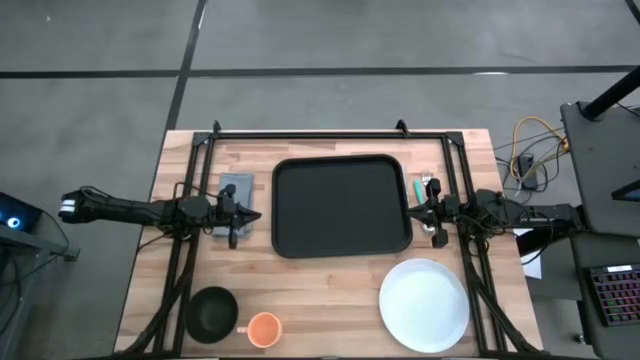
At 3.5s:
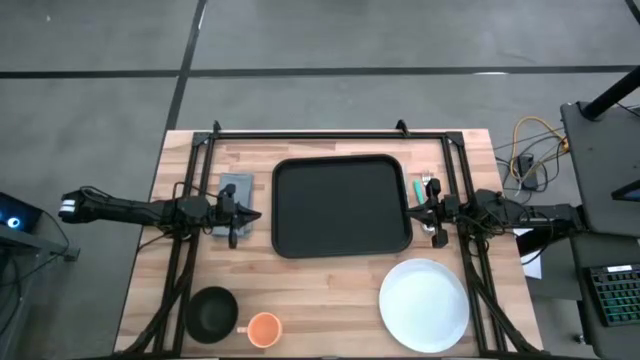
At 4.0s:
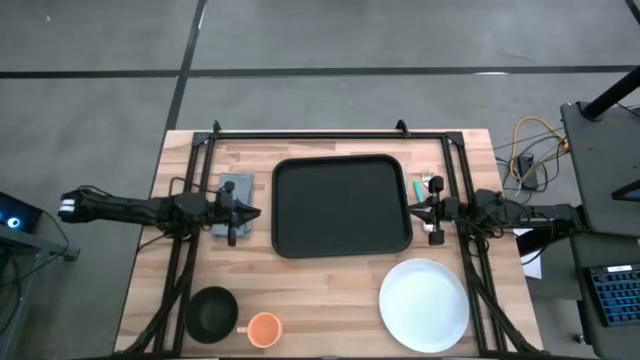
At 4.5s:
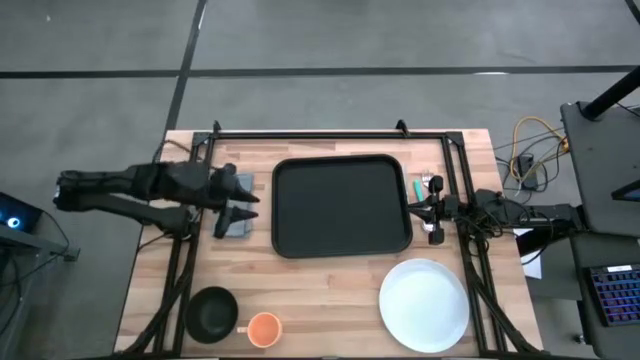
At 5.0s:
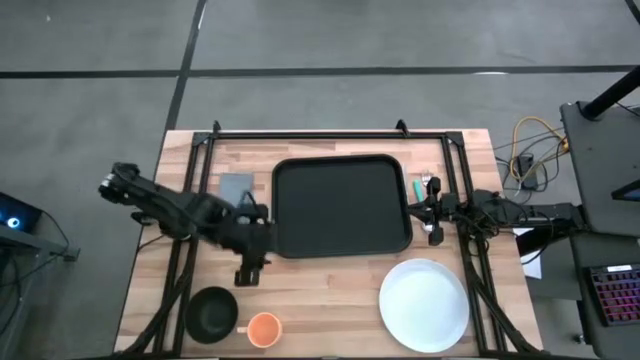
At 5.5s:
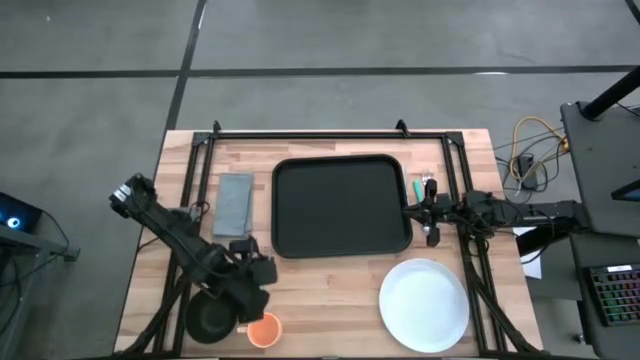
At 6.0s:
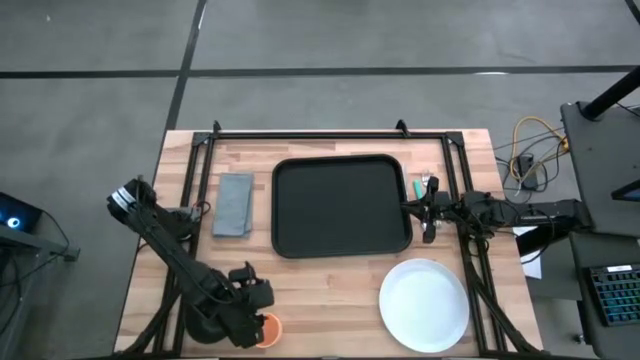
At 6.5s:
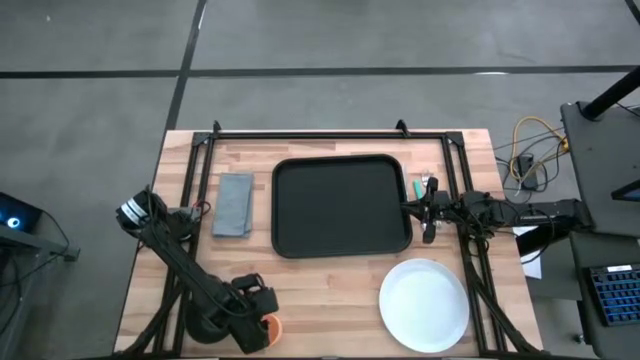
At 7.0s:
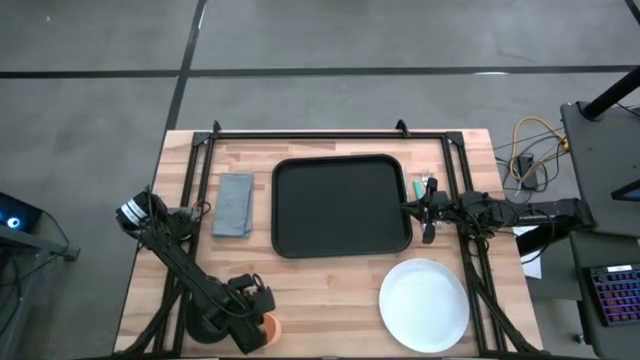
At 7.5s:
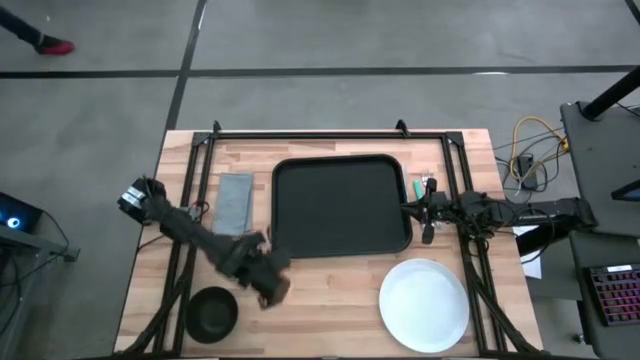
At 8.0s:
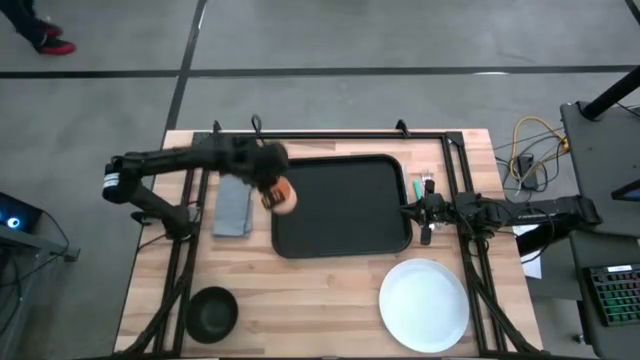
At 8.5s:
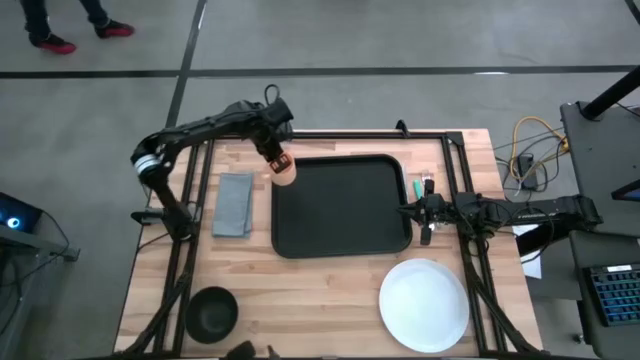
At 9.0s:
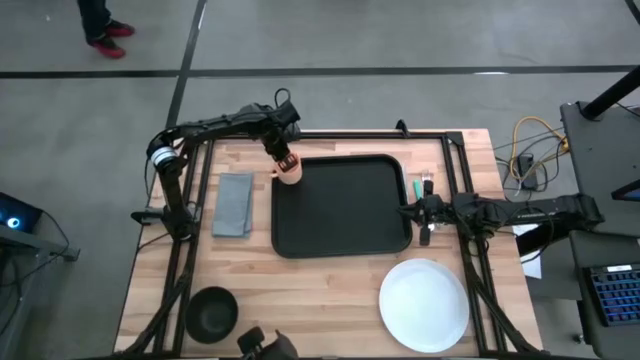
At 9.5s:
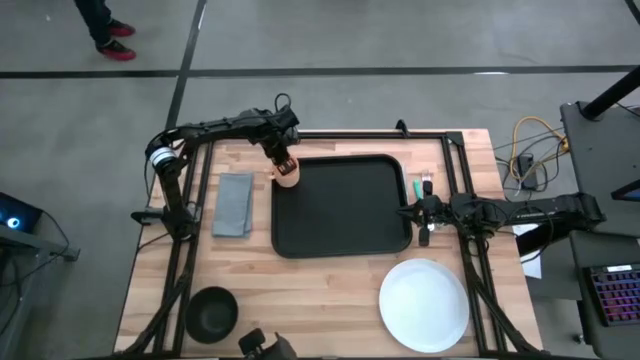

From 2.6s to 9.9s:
Task: Set up tray
Put the orange mug on the top left of the black tray

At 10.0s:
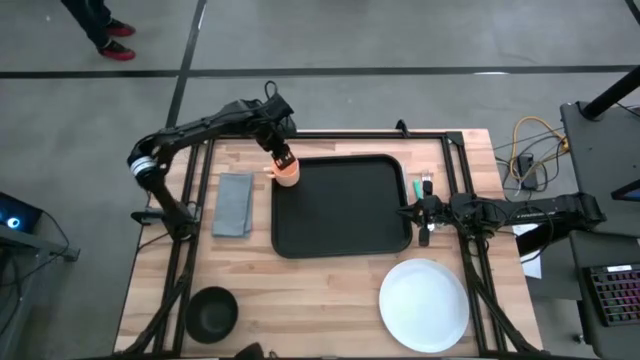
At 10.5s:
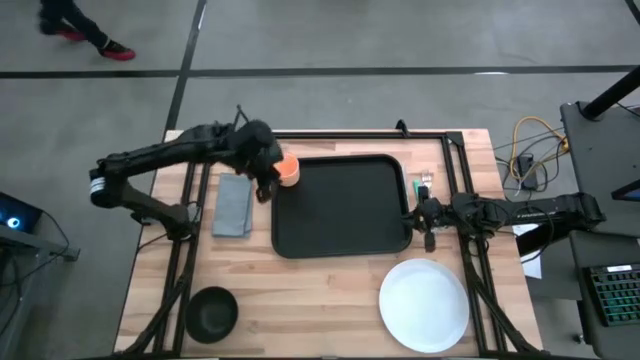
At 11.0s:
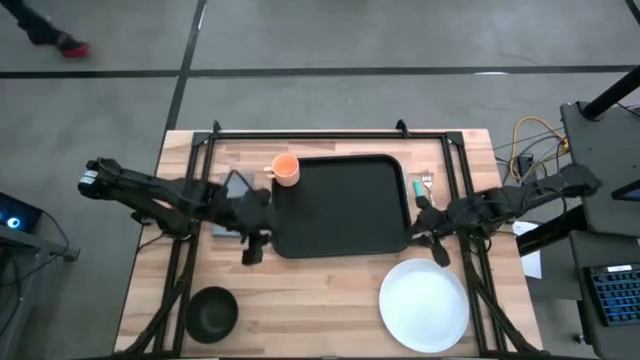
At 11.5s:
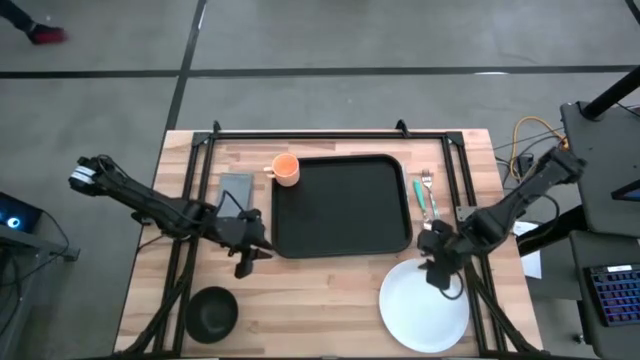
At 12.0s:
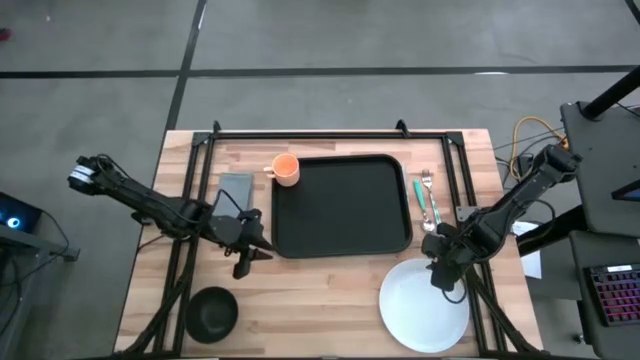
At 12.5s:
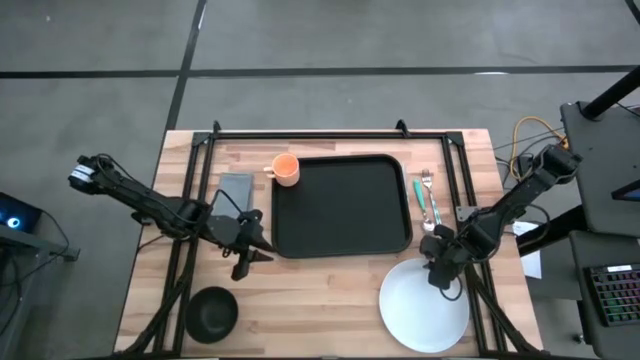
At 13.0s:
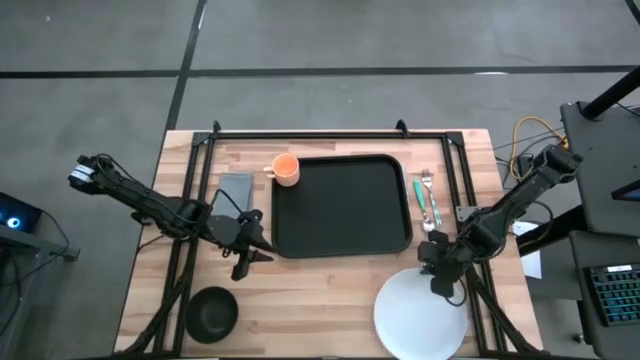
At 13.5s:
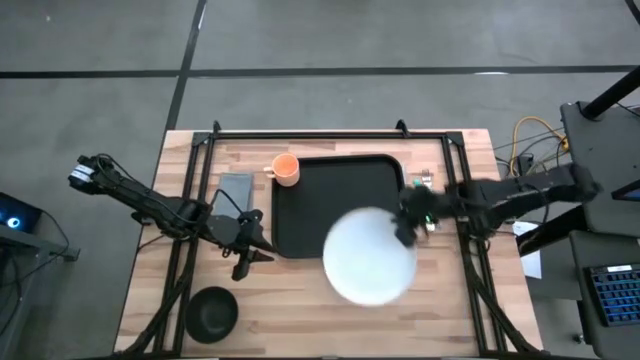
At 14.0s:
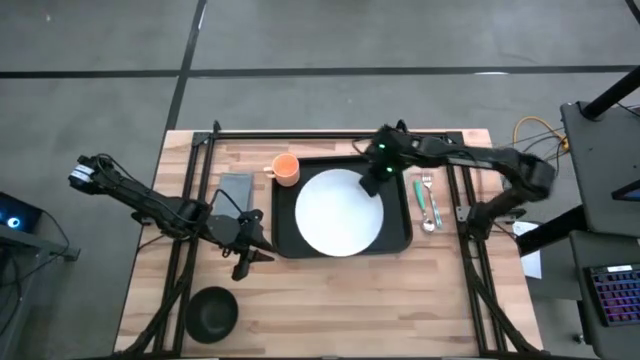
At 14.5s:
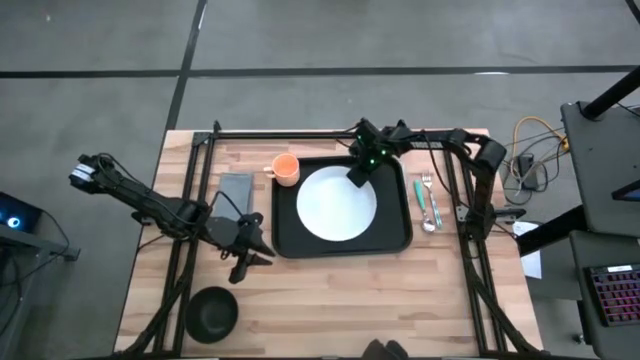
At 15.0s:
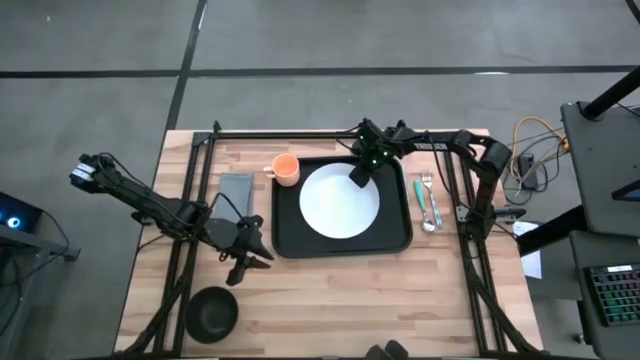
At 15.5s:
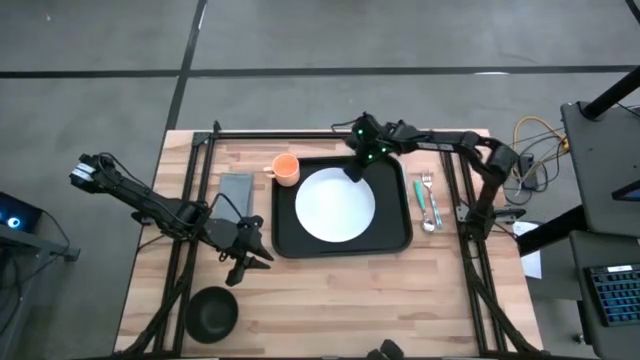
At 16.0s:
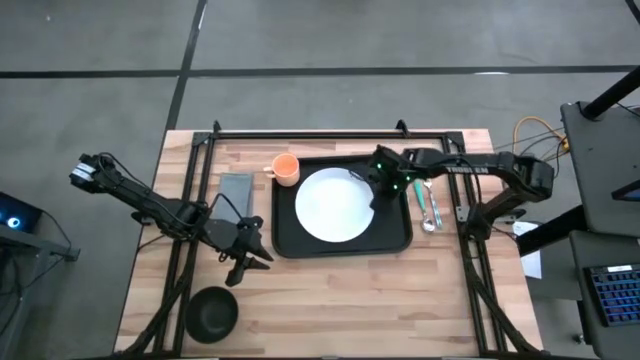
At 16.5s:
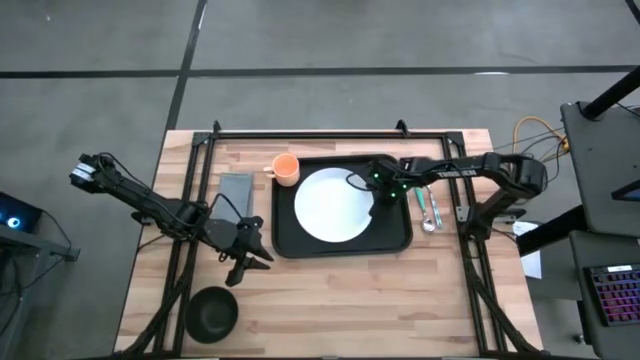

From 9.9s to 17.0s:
Put the white plate on the black tray to the bottom right of the orange mug

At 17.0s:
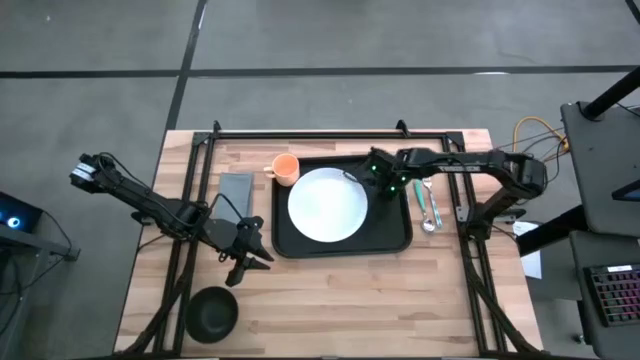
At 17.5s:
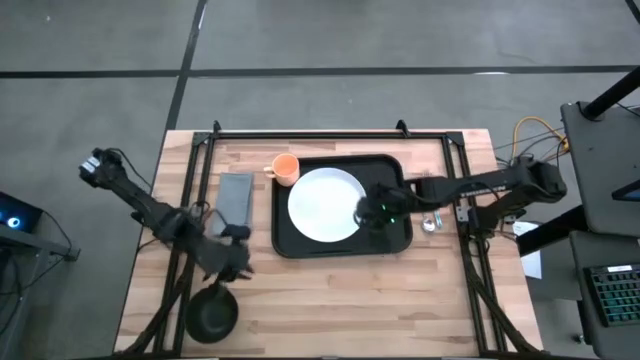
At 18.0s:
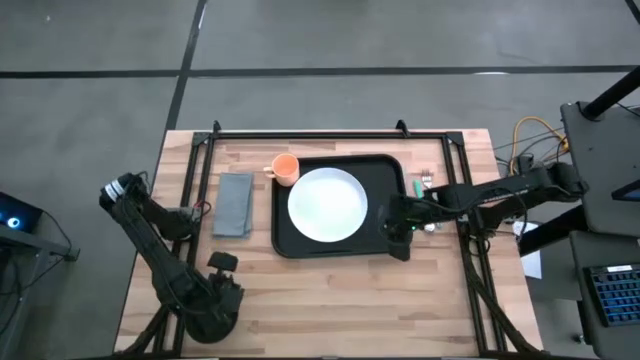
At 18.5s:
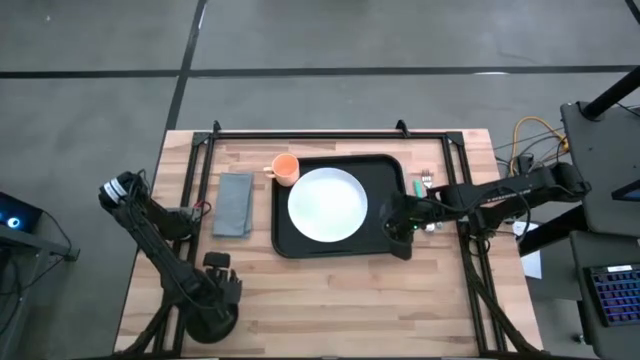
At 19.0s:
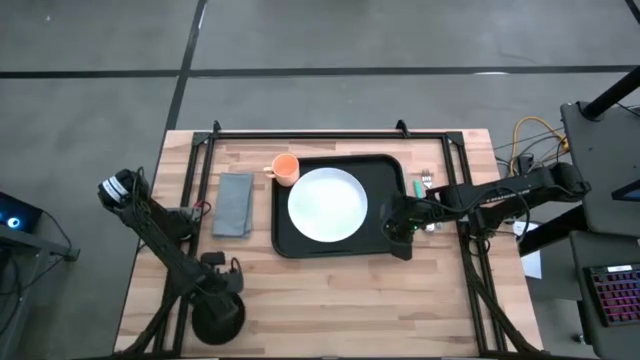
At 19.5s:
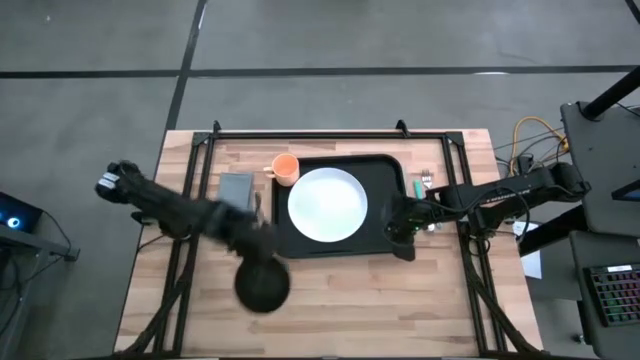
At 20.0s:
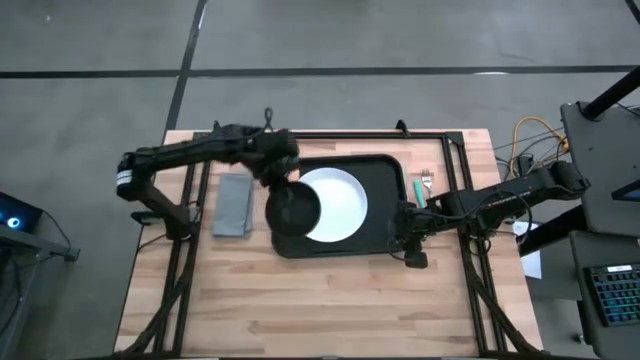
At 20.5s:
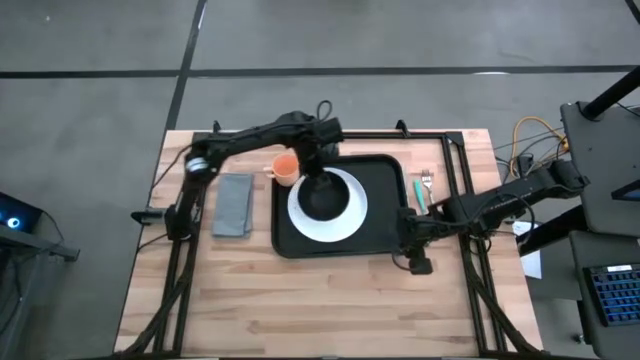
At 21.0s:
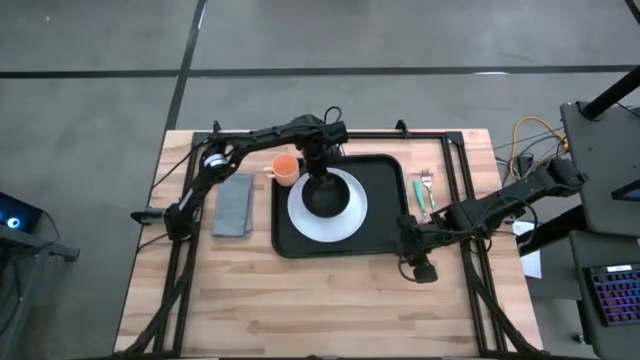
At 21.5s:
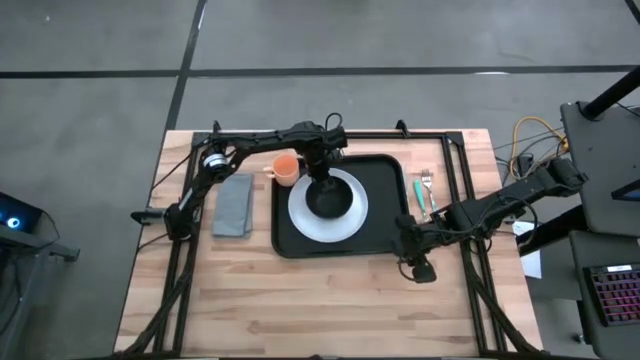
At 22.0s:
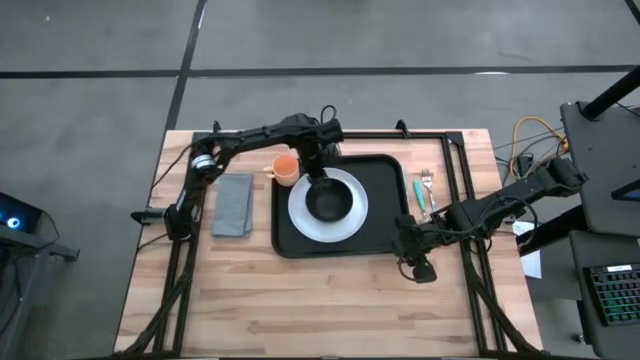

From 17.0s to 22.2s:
Put the black bowl on top of the white plate

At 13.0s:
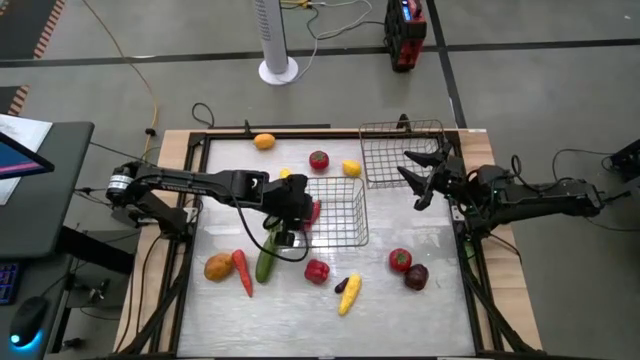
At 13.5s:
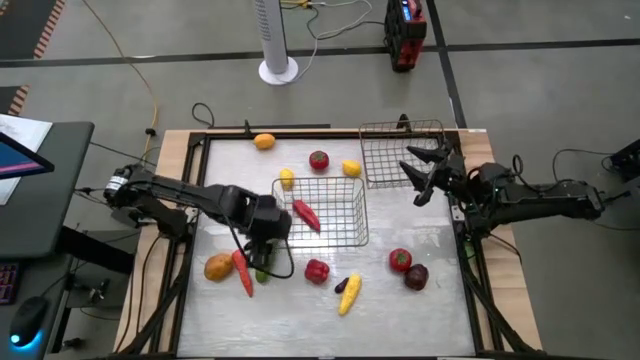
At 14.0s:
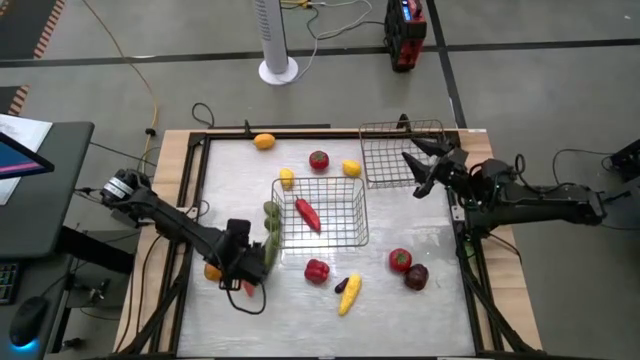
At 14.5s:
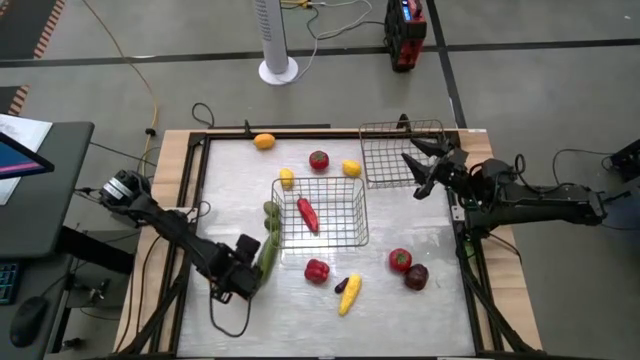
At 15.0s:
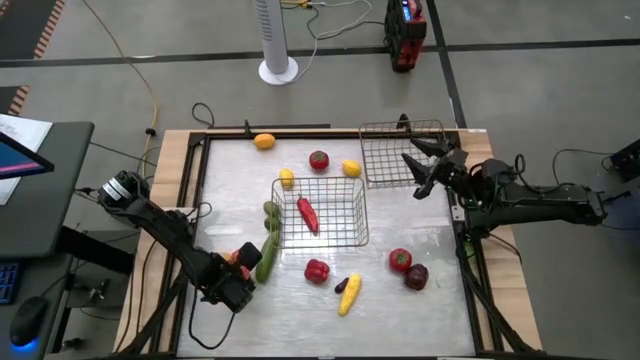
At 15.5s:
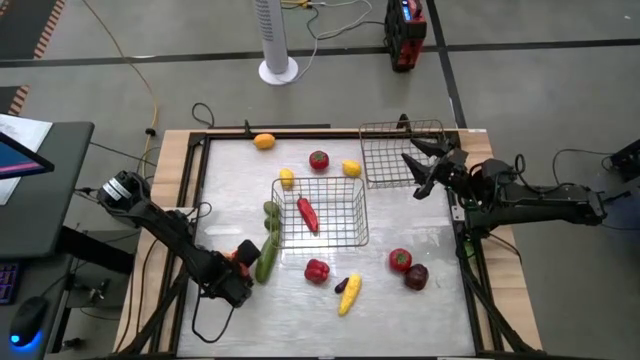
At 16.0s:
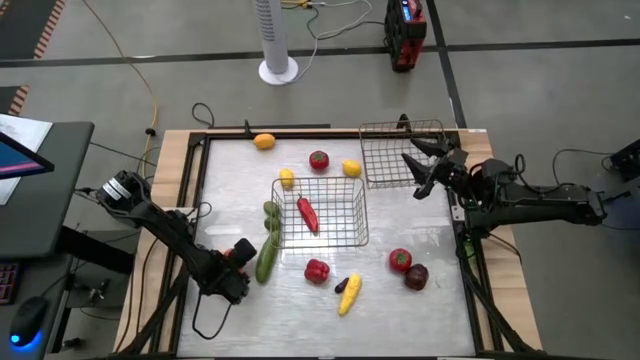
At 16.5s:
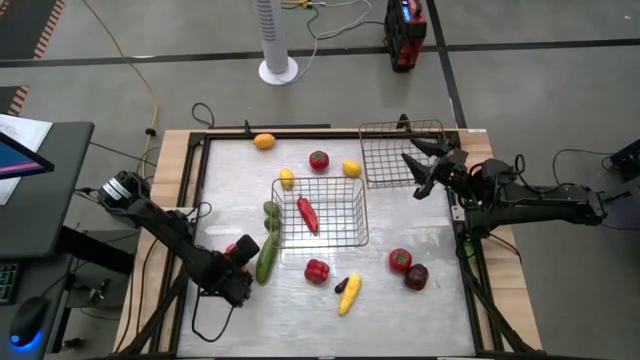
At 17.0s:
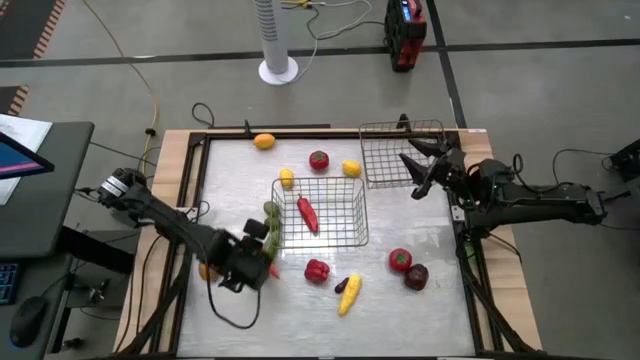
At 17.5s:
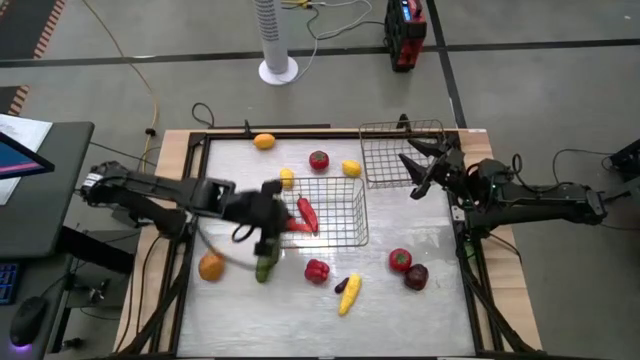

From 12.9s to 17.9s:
Task: Sort produce into baskets
Put the orange carrot into the left wire basket
